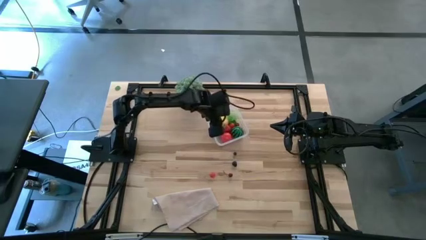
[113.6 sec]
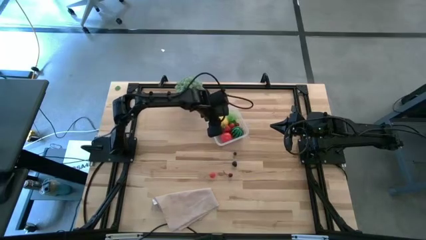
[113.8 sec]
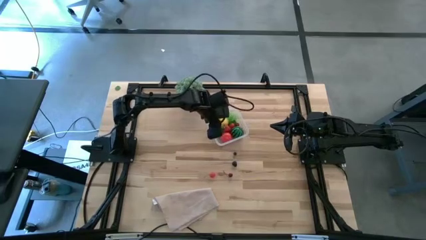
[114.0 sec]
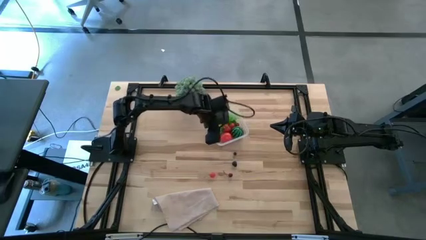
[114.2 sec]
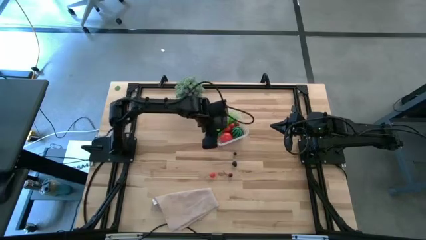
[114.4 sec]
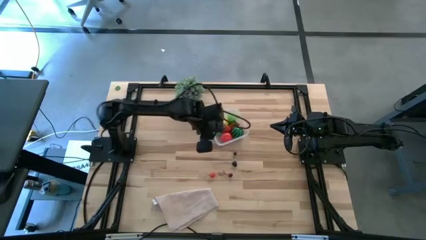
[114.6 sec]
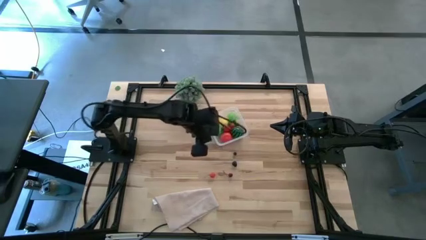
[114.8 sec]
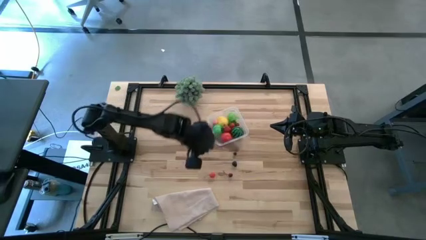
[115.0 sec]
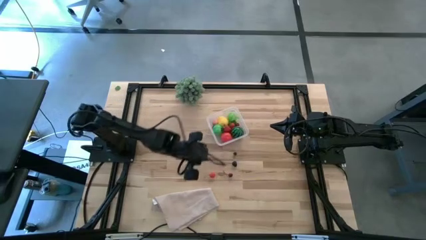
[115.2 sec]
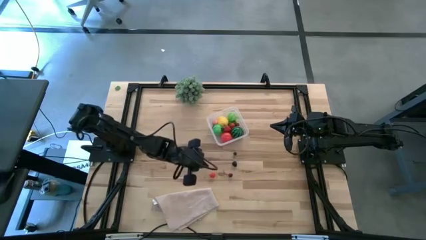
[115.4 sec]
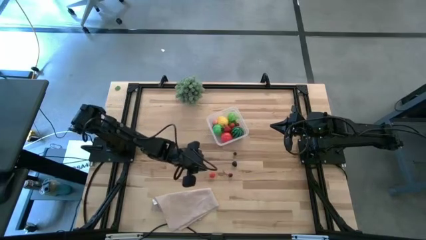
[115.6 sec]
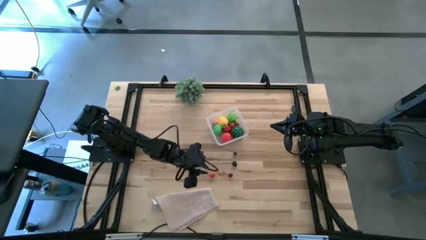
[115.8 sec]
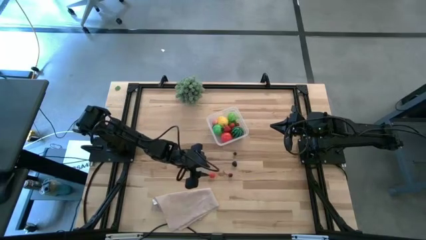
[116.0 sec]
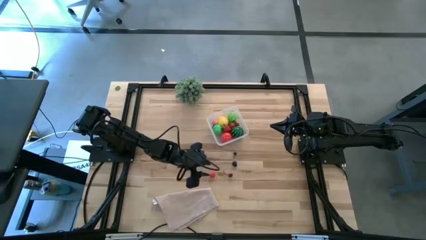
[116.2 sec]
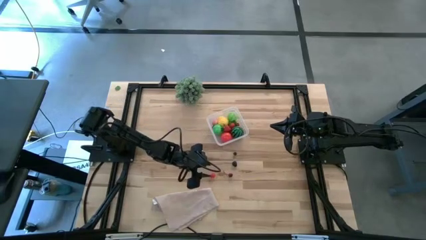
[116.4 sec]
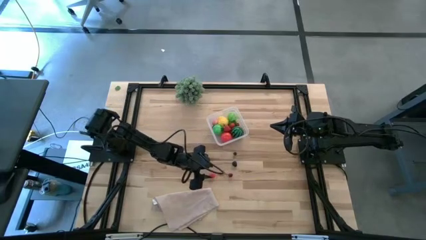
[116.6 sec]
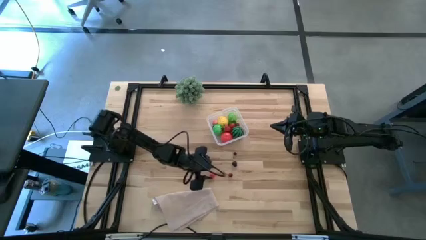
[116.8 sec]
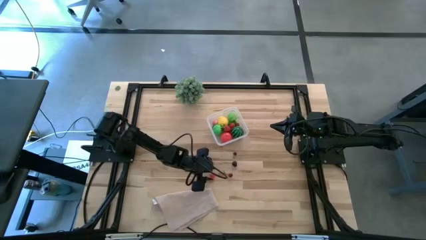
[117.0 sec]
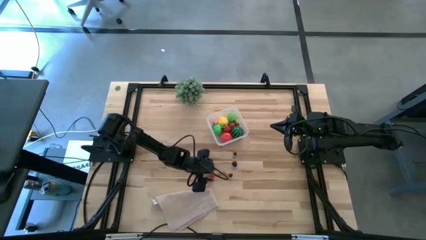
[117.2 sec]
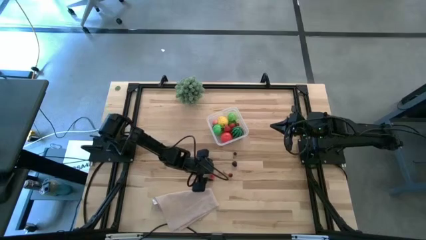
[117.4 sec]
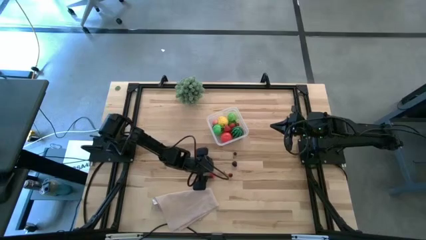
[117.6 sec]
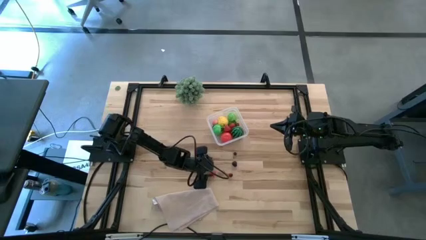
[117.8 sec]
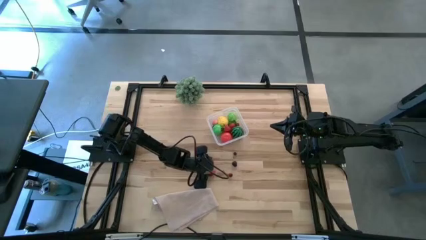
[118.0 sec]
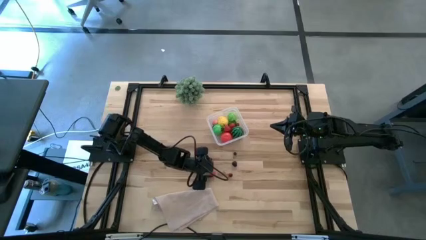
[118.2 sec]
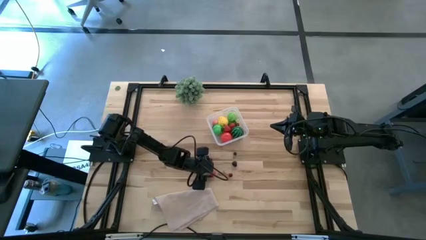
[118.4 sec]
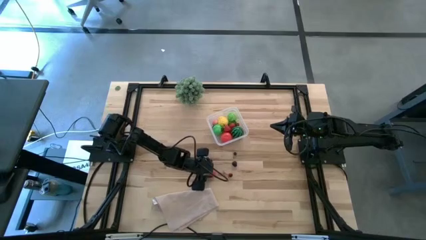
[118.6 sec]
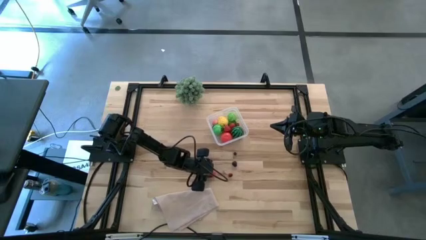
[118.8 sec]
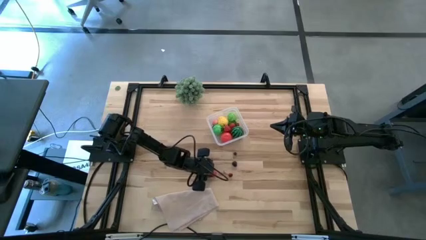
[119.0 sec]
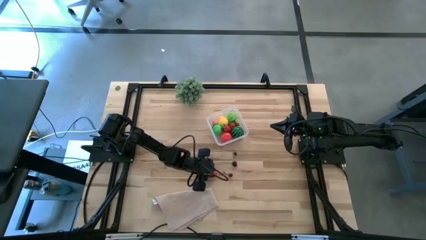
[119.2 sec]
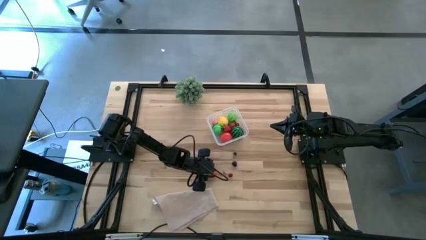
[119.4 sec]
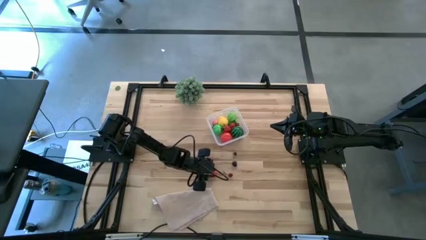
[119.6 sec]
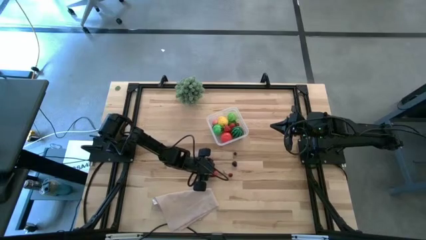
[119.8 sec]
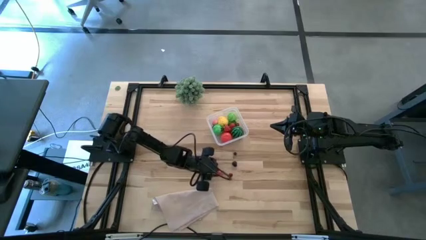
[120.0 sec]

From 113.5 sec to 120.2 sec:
Task: Pick and placing Produce into tupperware
Put the red cherry into the transparent bin

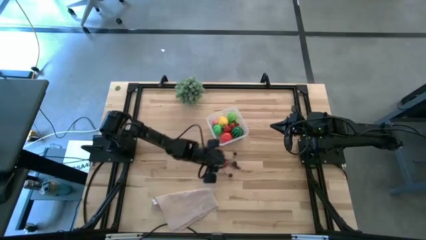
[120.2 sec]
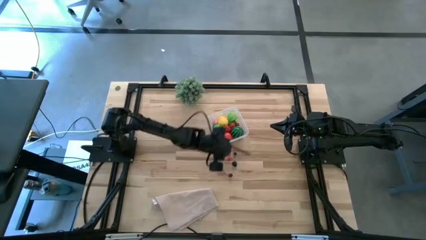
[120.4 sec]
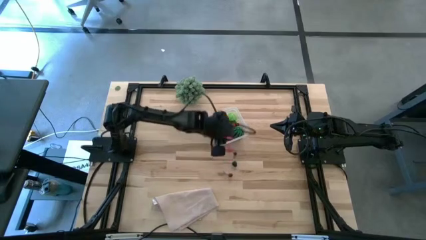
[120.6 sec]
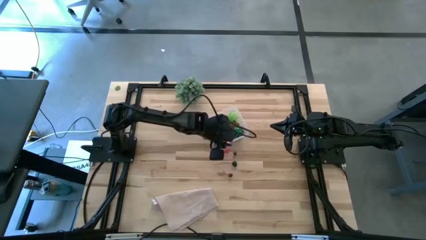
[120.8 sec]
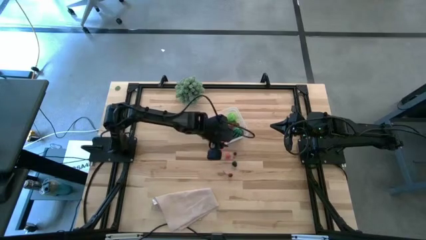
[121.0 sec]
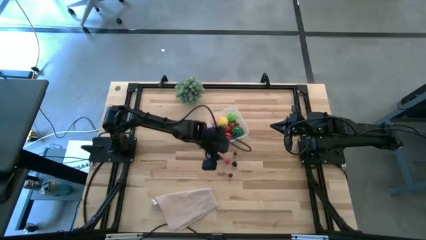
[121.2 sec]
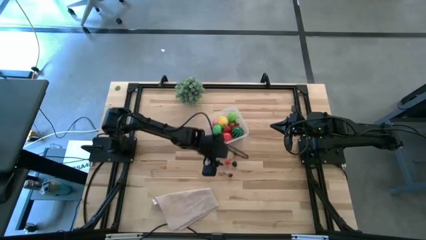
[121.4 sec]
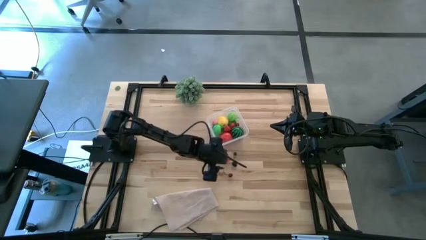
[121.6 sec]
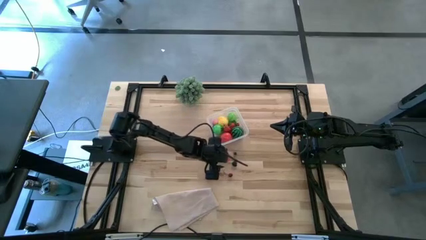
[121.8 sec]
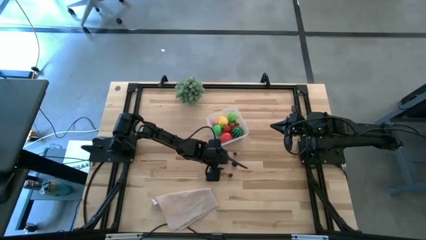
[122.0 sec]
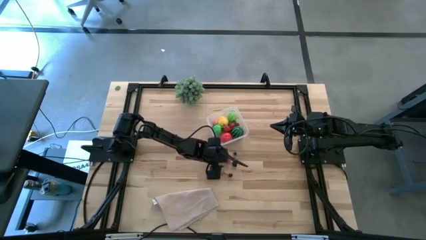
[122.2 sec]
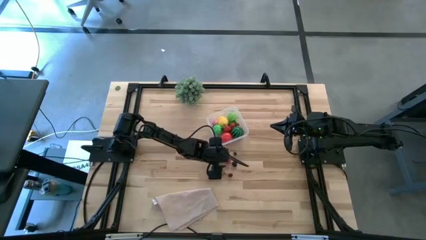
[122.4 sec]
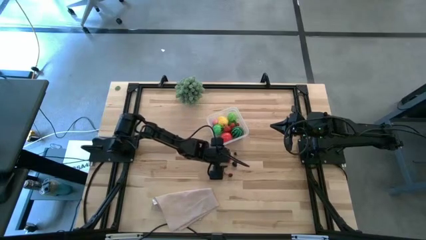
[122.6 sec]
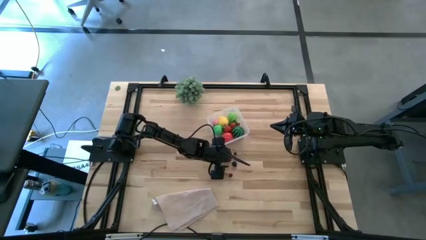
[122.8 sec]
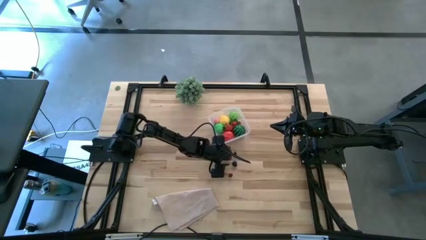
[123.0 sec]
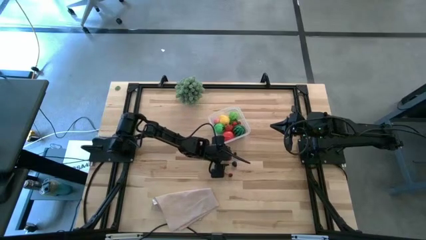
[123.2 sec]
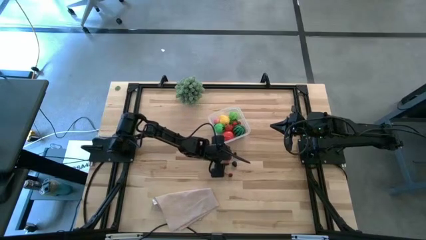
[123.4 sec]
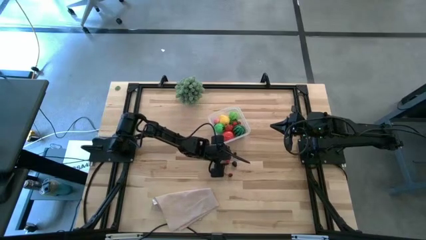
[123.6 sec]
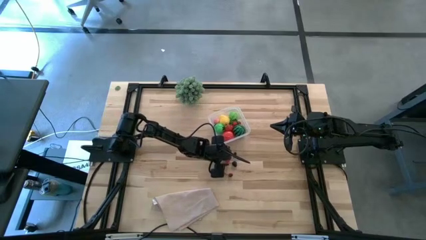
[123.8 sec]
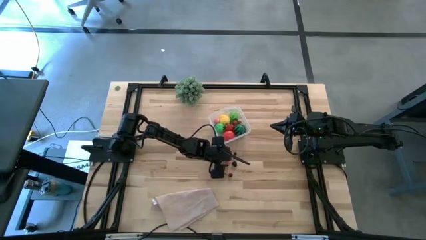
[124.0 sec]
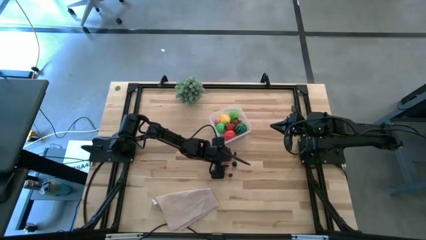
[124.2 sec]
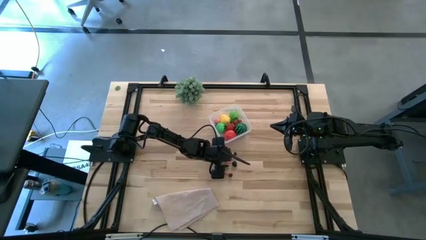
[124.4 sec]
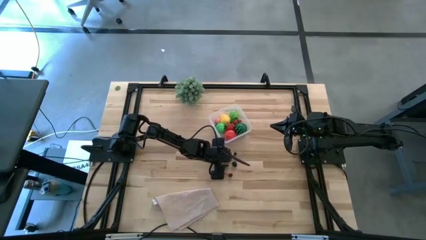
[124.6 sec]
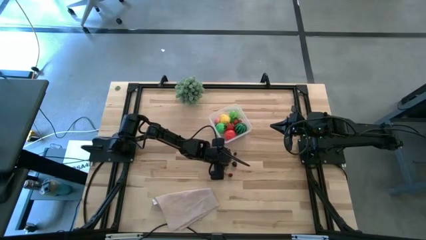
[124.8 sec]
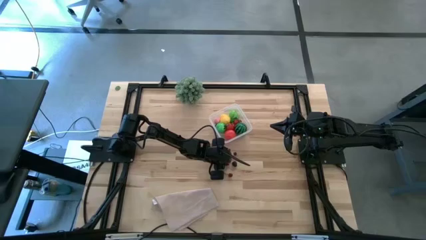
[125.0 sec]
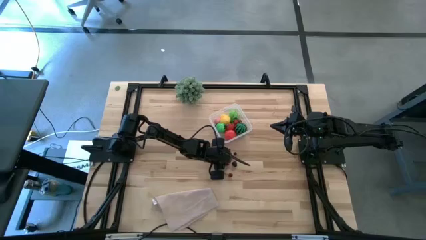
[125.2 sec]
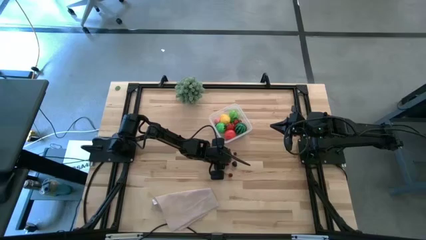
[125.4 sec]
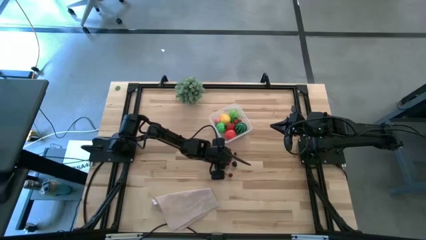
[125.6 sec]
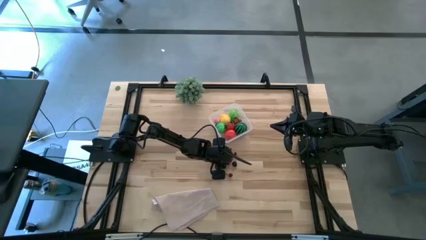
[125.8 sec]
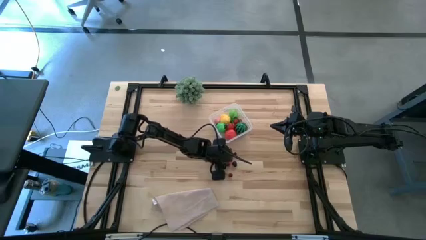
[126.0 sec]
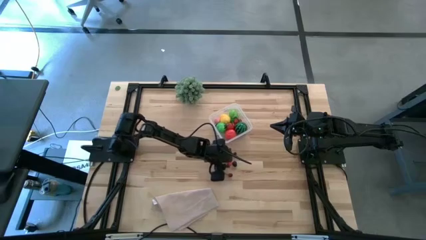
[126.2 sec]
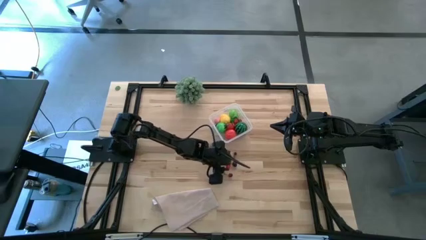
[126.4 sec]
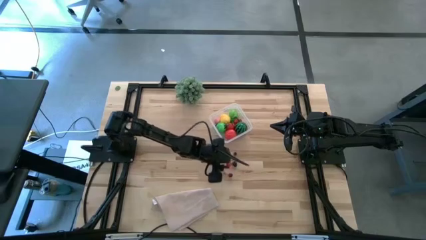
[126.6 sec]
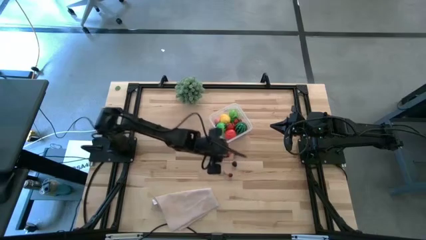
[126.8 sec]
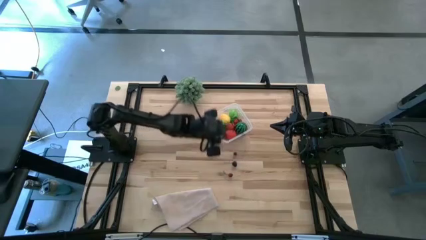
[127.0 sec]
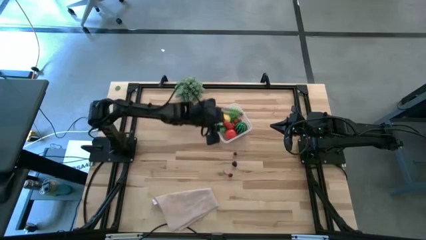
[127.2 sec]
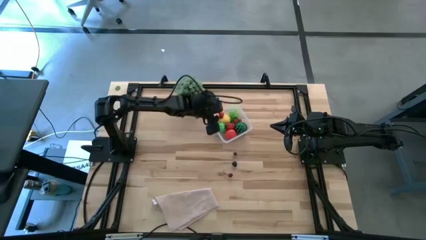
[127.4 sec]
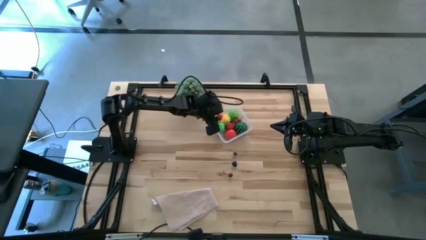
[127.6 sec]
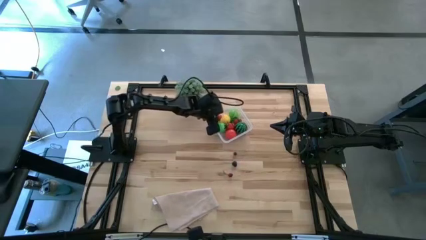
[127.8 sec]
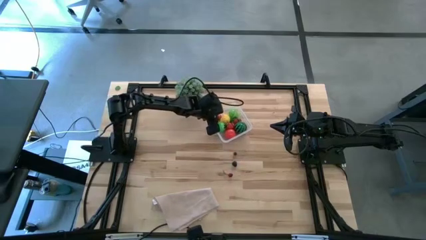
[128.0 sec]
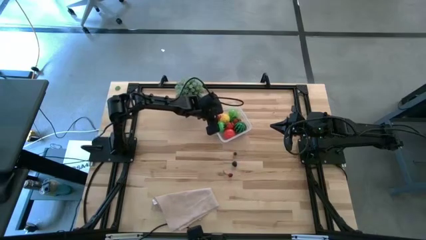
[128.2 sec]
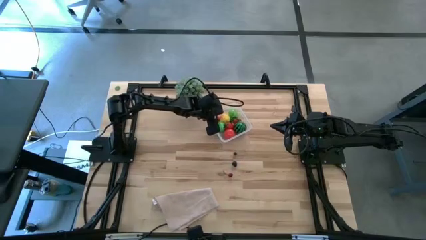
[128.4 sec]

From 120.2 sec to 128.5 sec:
Put the red cherry into the transparent bin

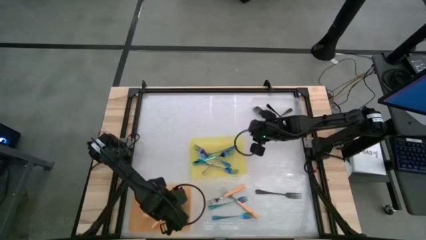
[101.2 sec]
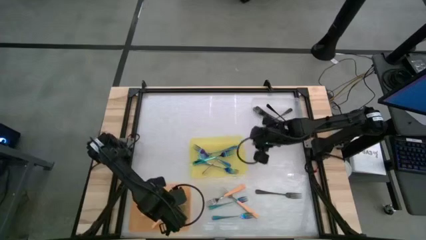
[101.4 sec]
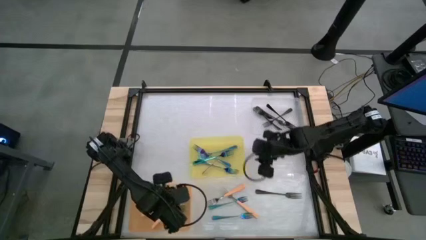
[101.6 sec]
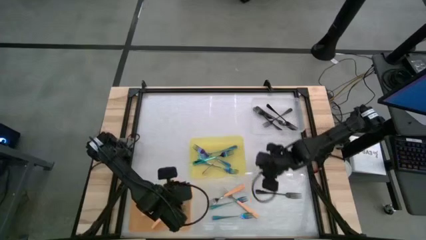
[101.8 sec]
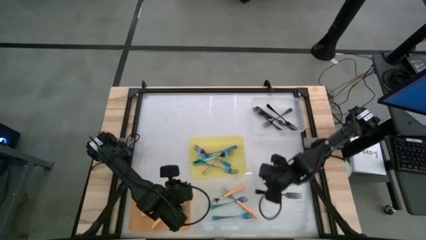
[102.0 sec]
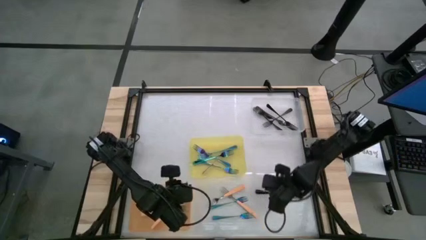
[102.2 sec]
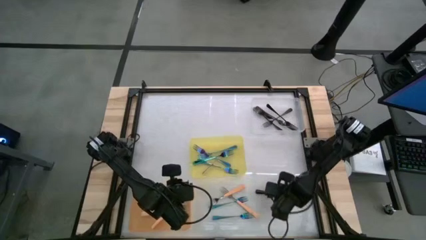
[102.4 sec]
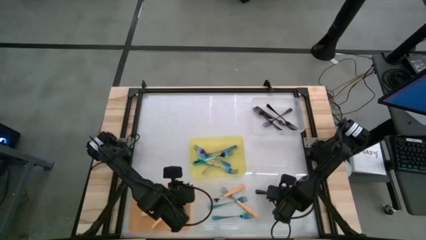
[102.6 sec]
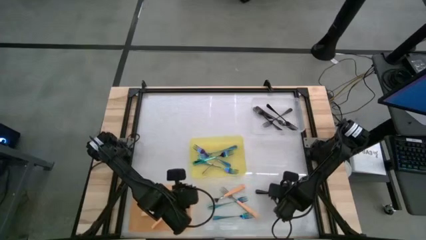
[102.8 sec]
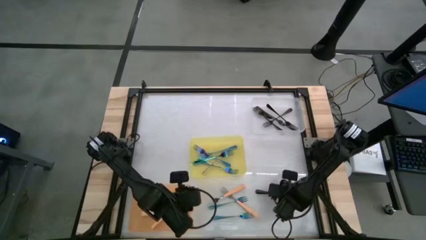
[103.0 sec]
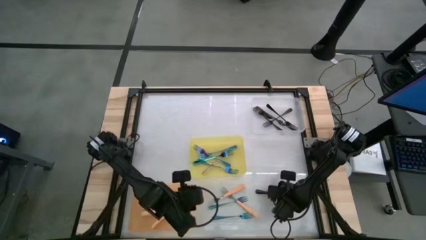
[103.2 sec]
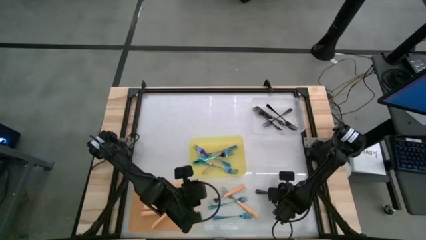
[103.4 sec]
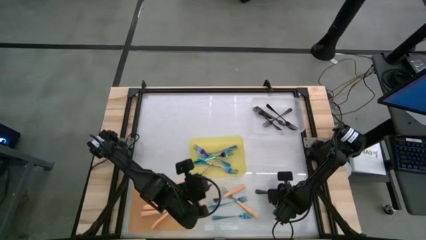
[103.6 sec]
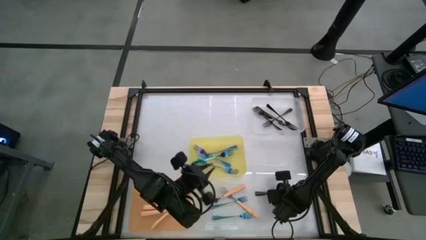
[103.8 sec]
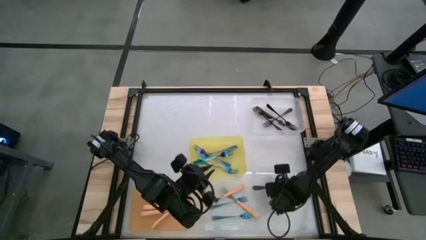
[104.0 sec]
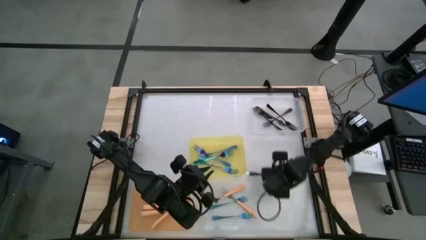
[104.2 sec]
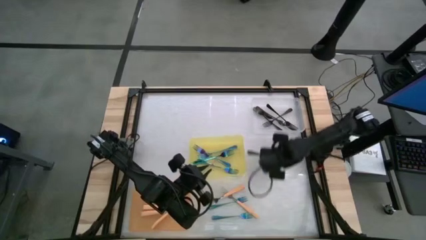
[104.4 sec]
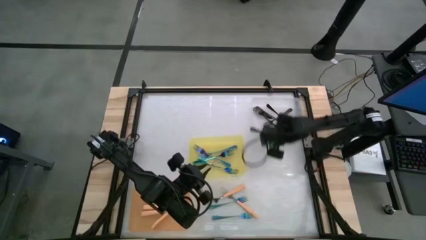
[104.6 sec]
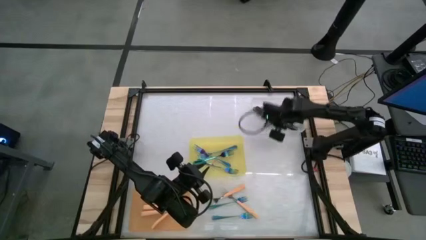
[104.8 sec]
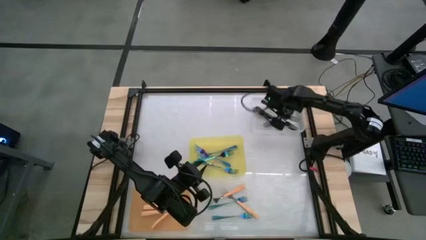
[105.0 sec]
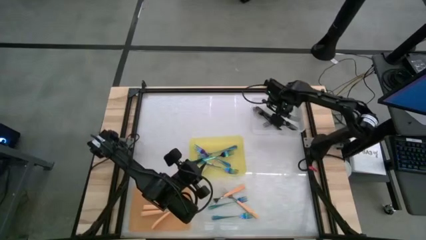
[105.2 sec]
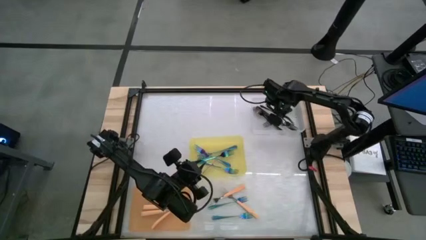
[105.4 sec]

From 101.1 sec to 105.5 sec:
Task: Sort silverware by color (type)
Put the black fork into the transparent bin
